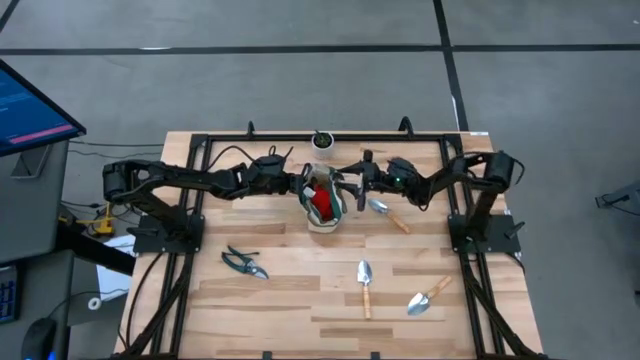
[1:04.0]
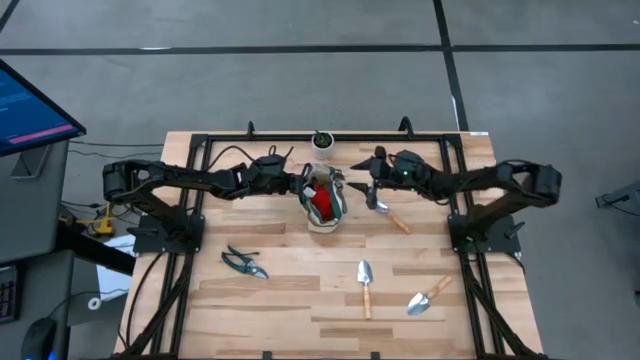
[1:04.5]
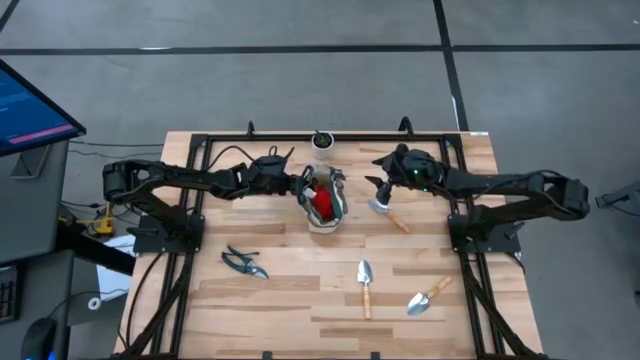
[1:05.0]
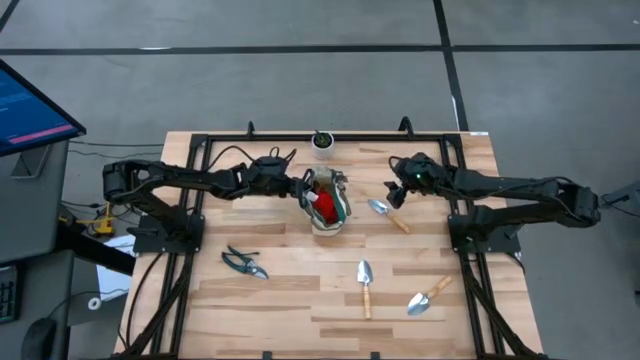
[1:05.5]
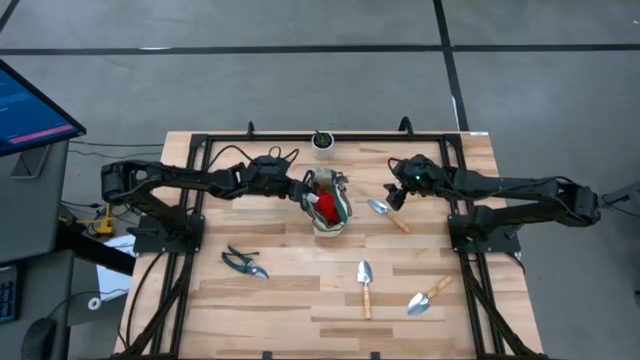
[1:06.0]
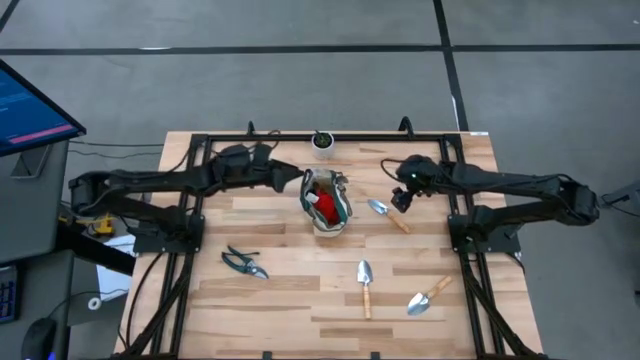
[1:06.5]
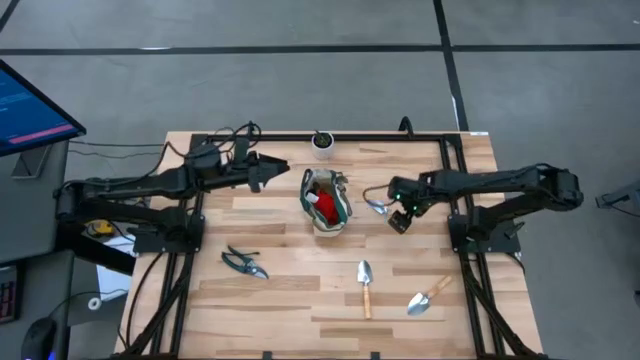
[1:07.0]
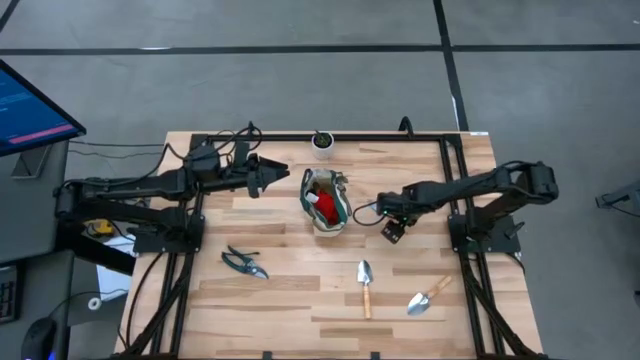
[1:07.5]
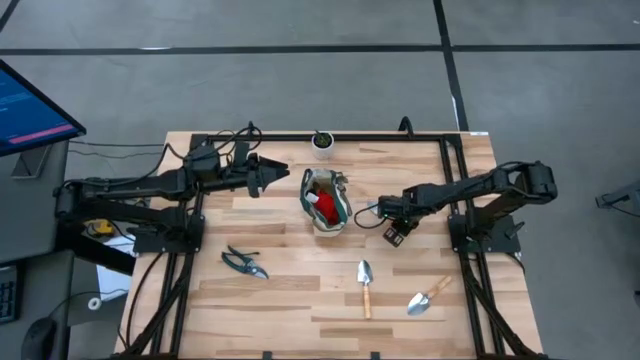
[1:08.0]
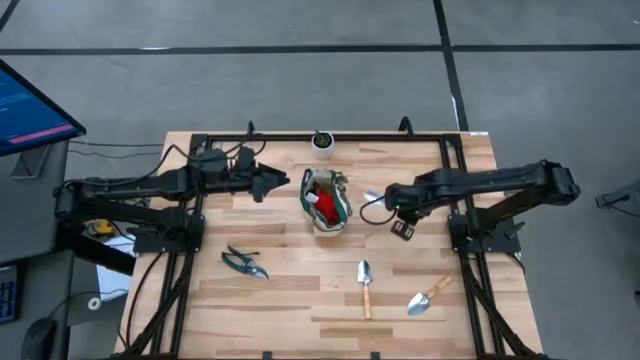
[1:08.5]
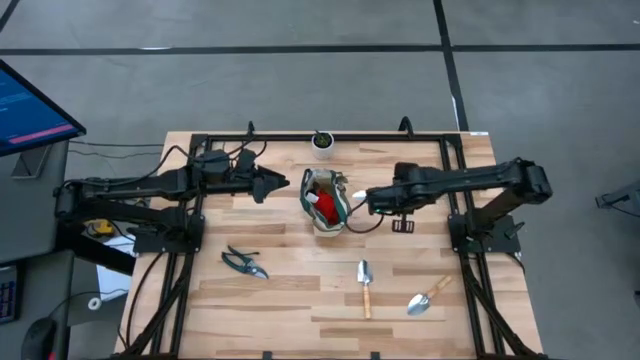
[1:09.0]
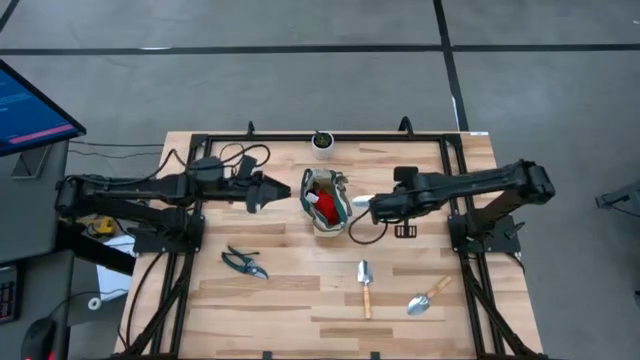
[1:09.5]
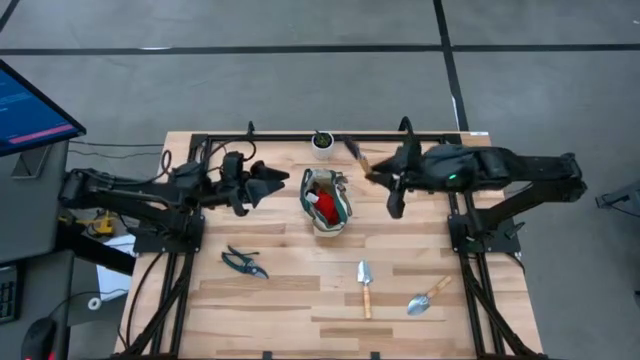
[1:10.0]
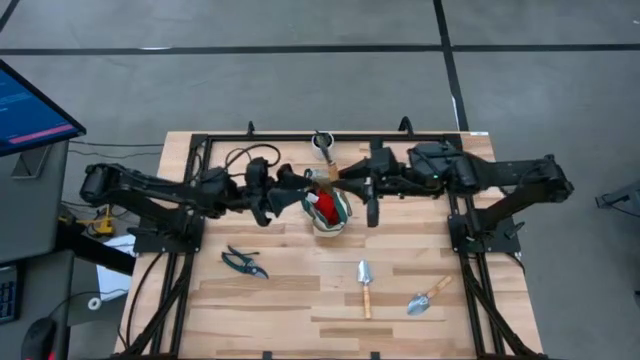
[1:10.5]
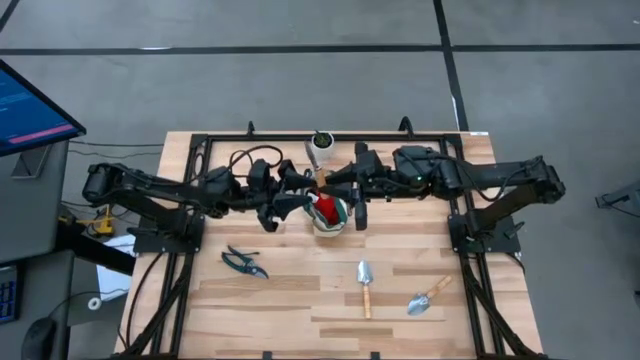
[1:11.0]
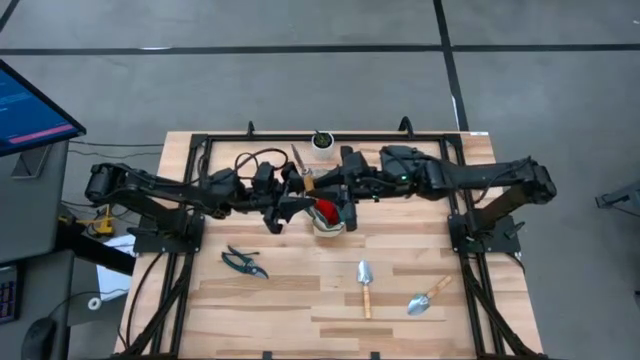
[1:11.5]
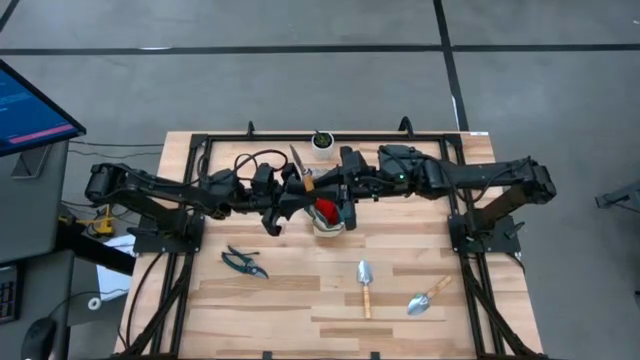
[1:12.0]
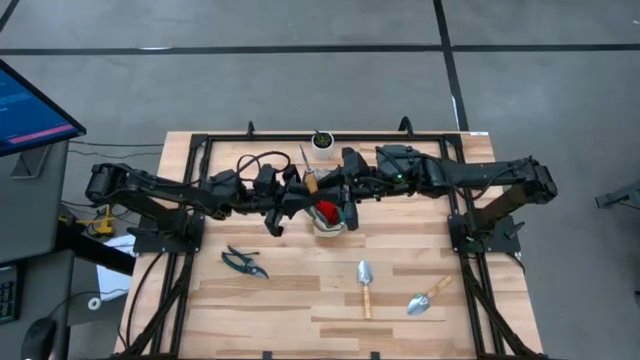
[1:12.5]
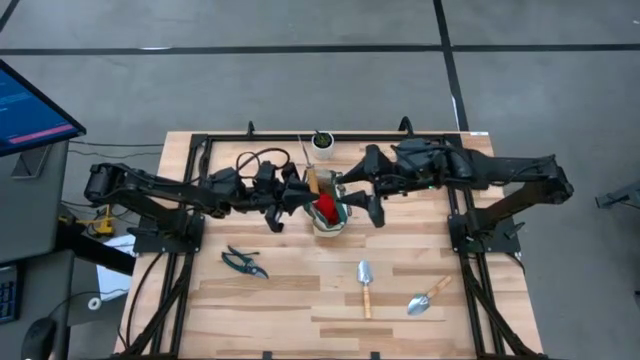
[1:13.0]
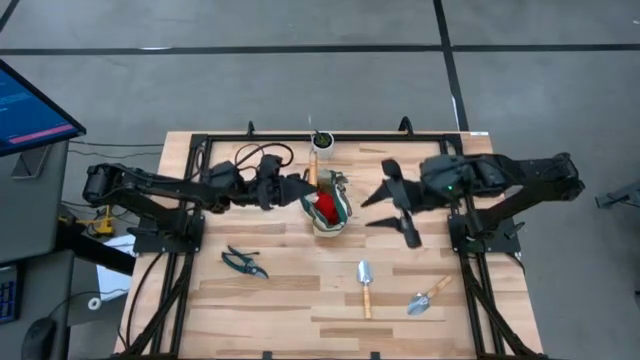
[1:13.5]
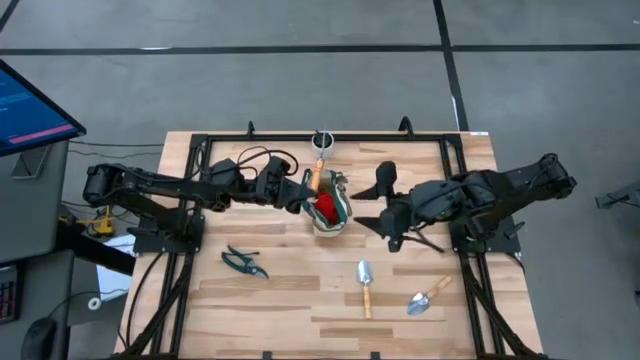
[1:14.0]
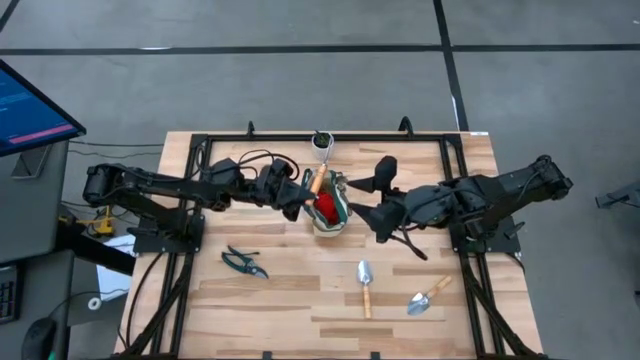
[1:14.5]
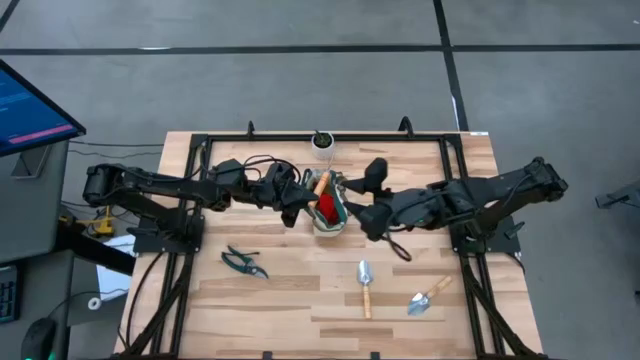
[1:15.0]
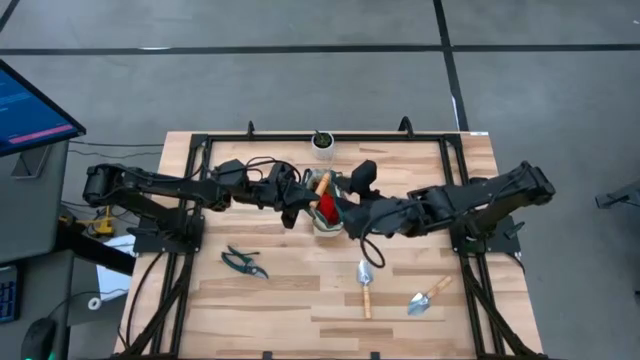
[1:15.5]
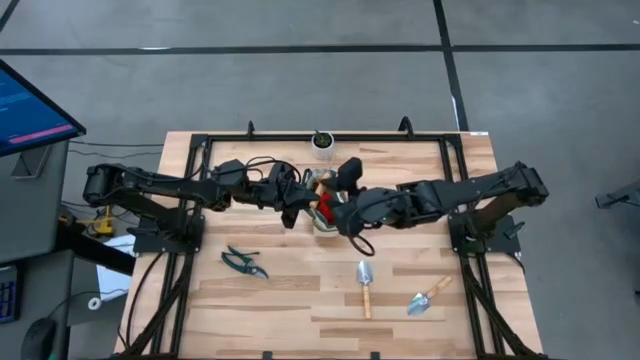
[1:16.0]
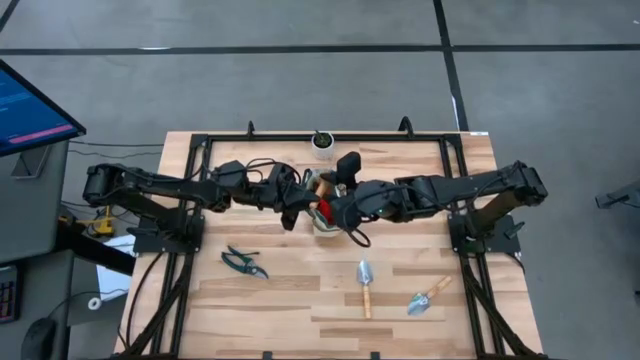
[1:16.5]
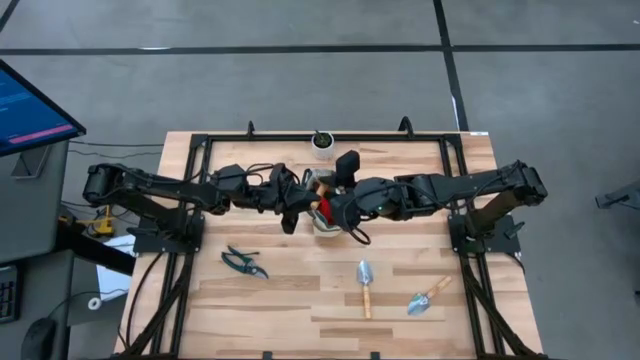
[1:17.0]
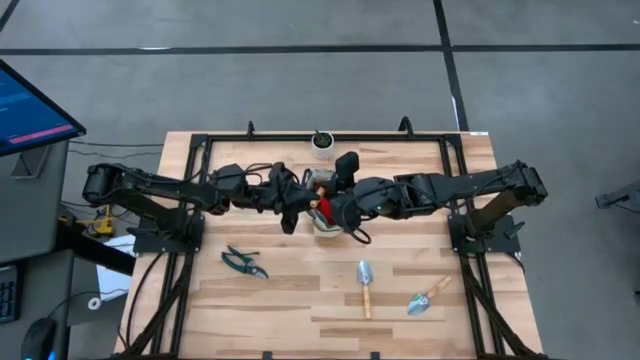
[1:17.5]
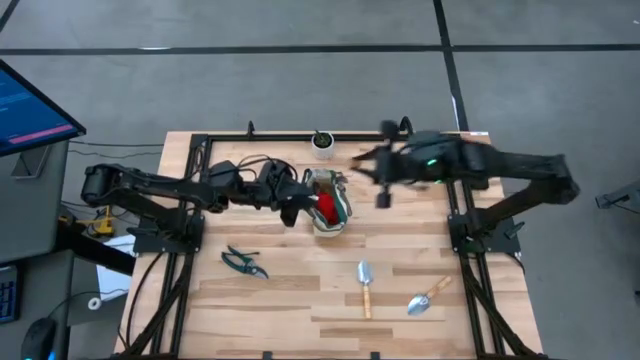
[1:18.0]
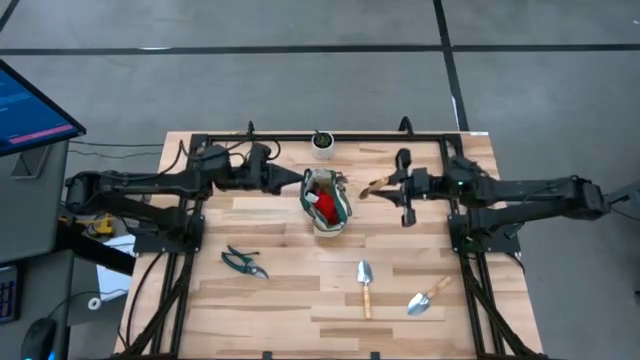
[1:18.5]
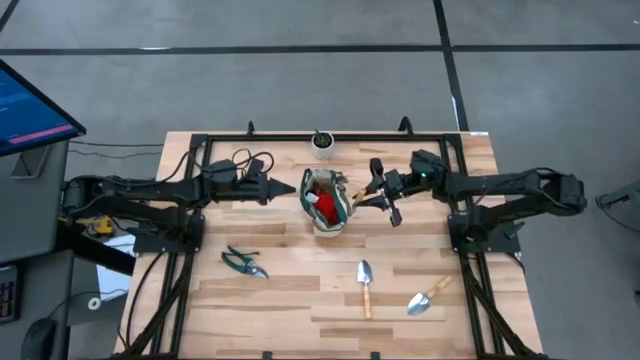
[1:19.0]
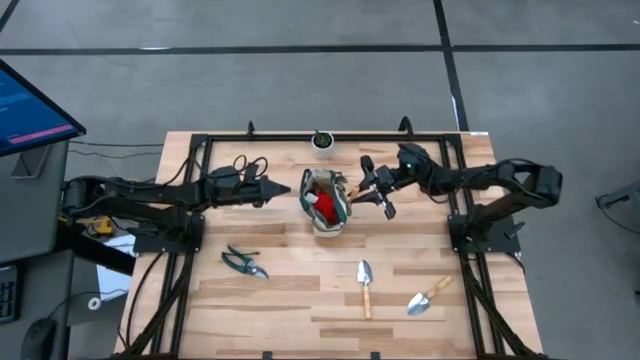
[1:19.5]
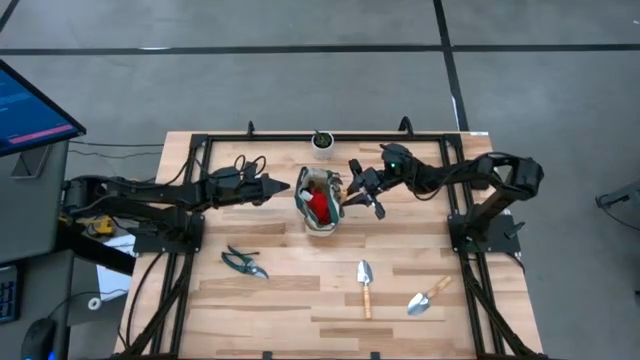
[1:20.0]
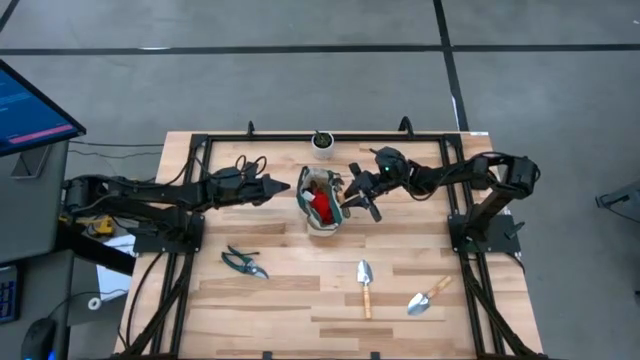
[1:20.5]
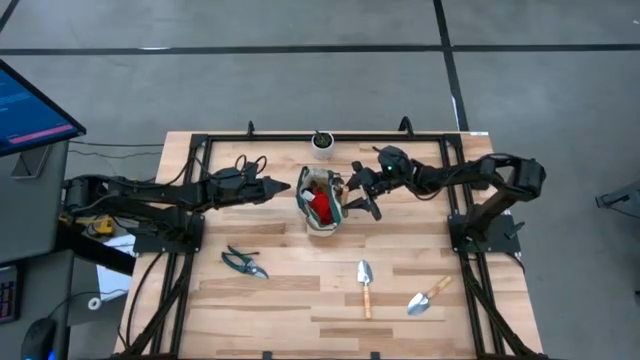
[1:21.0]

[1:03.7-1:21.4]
Task: Pick & Place Garden tools in Gardening bag
Put the brown trowel into the green gardening bag

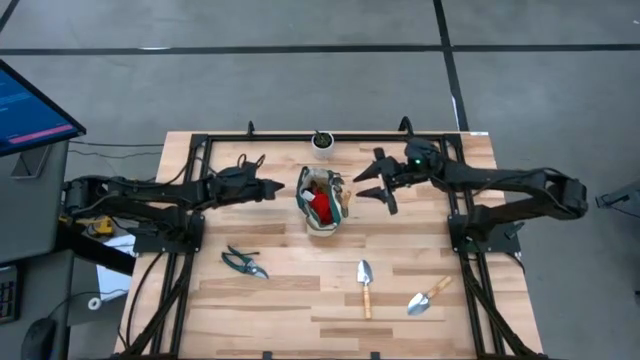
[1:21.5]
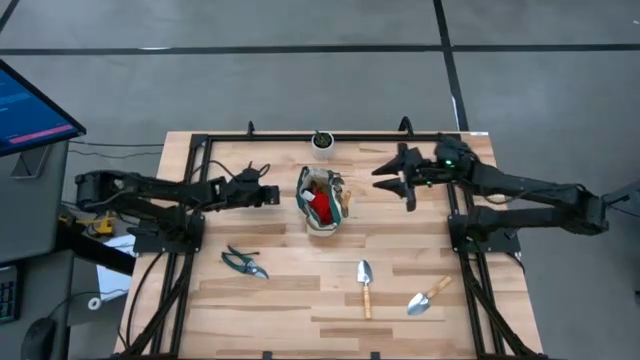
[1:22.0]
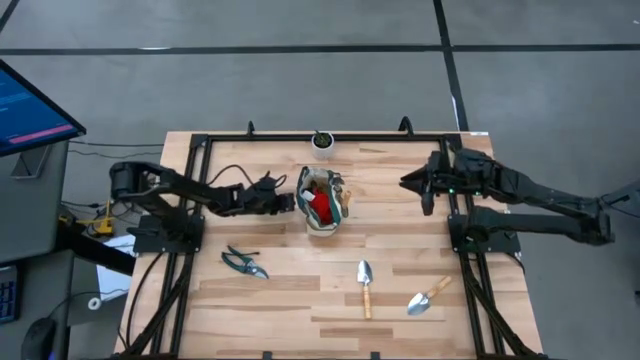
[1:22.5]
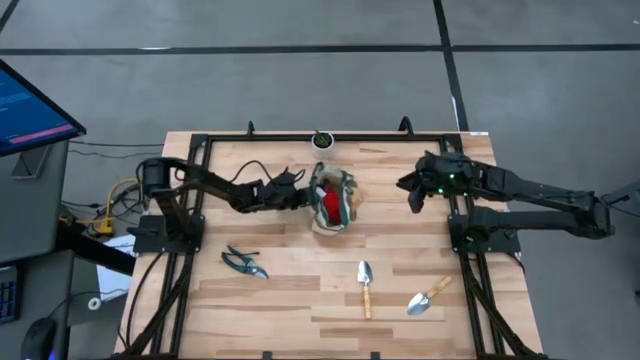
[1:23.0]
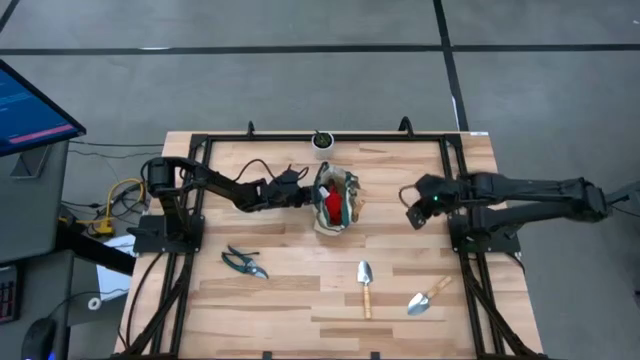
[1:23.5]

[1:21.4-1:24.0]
Adjust the gardening bag

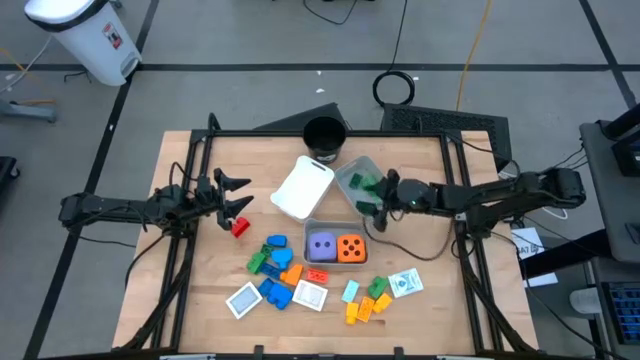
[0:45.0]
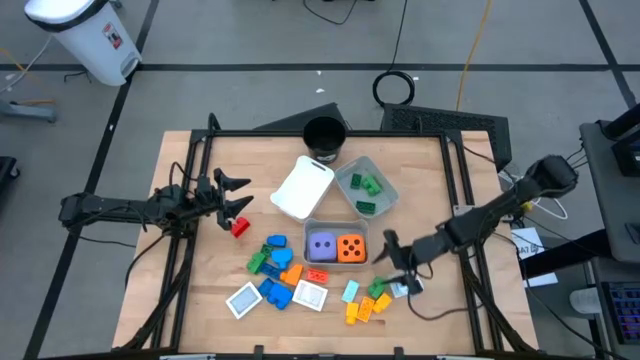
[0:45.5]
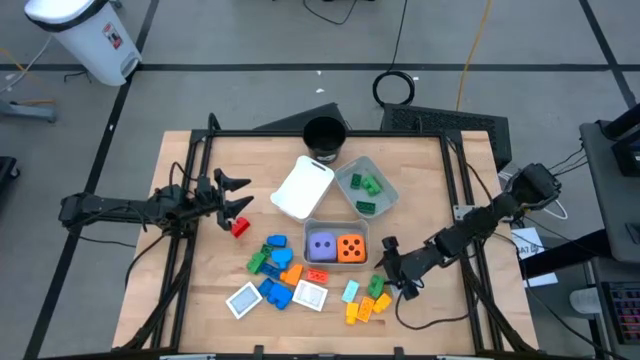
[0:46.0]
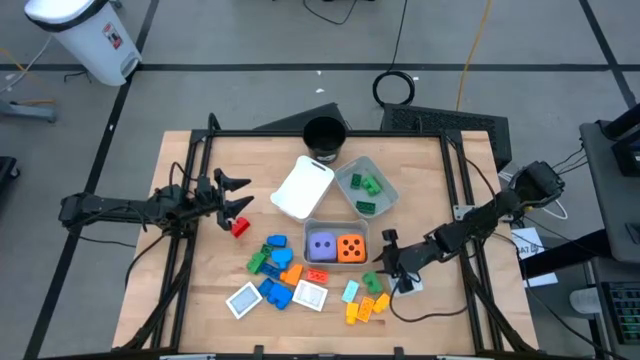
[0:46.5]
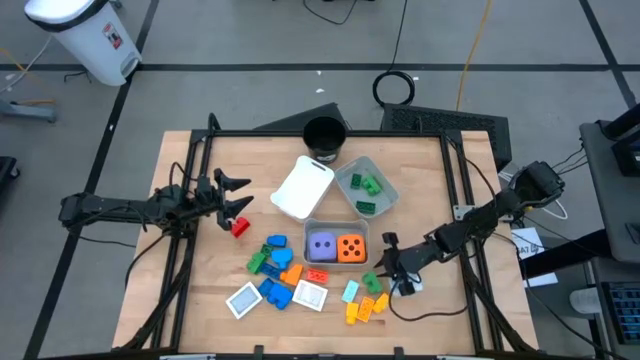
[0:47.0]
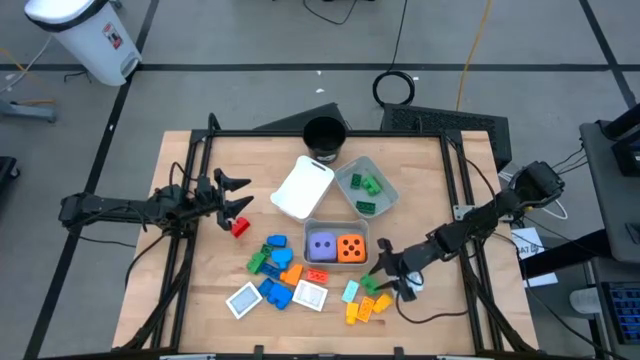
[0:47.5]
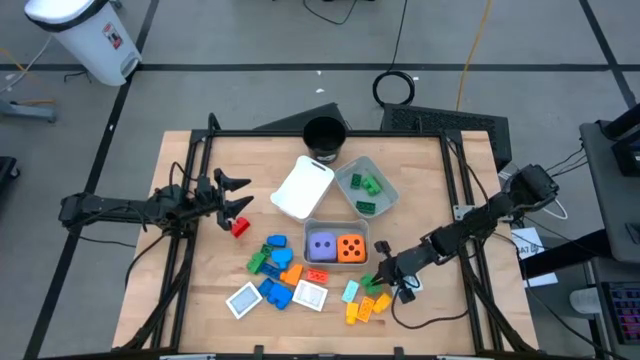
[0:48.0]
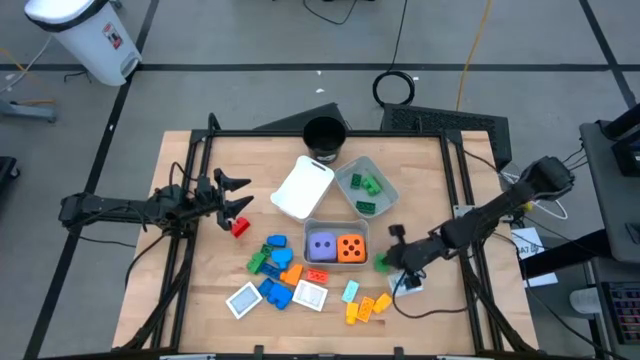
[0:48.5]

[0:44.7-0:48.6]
Task: Pick & Place Toys
Put the green game piece into the top gray bin
